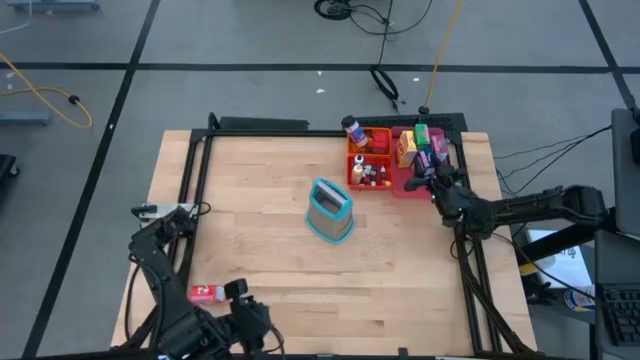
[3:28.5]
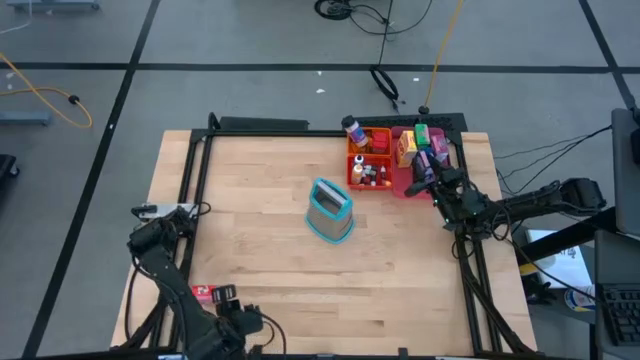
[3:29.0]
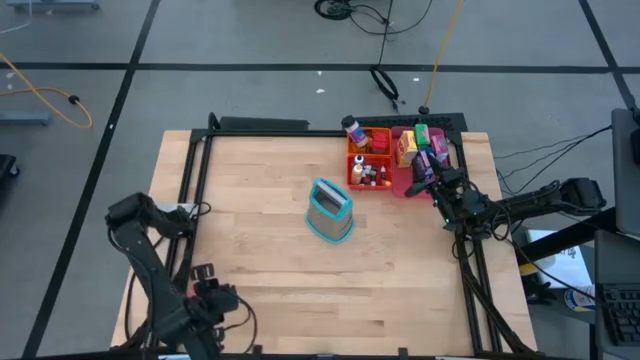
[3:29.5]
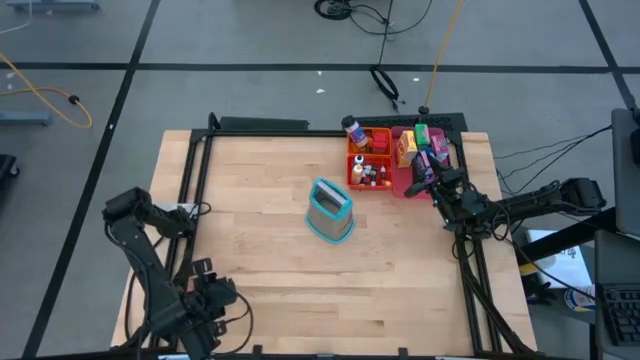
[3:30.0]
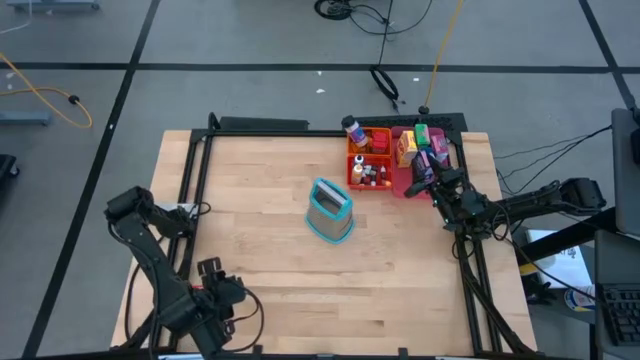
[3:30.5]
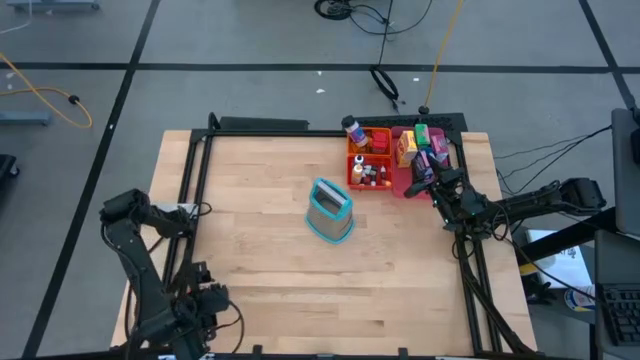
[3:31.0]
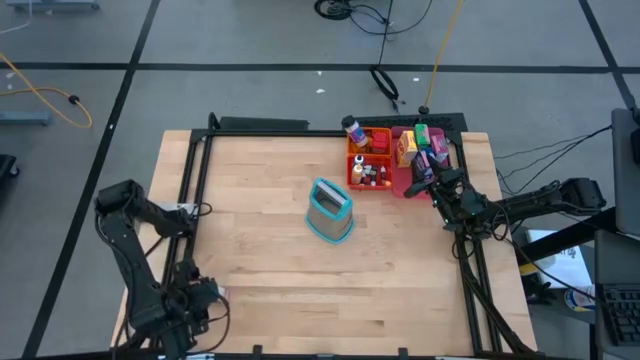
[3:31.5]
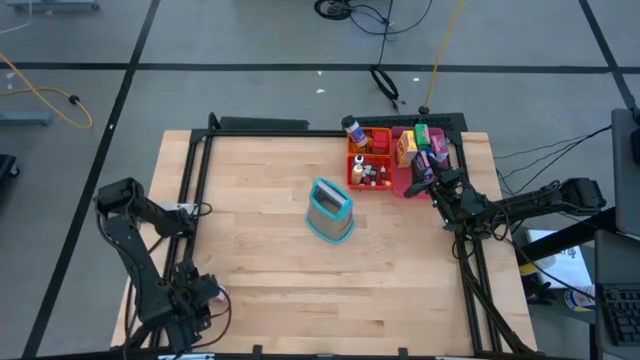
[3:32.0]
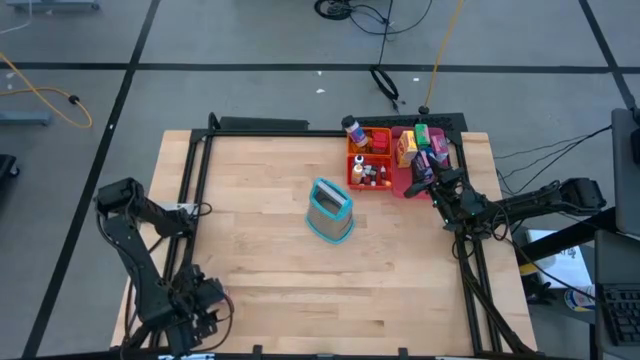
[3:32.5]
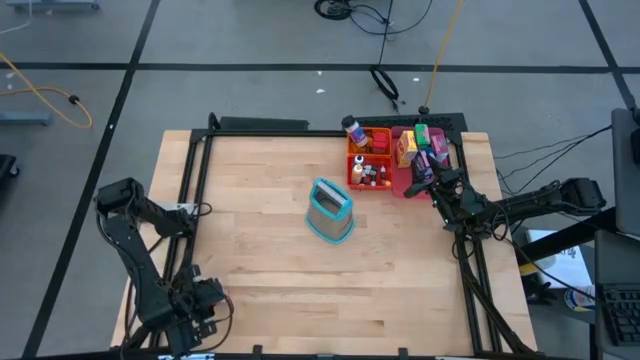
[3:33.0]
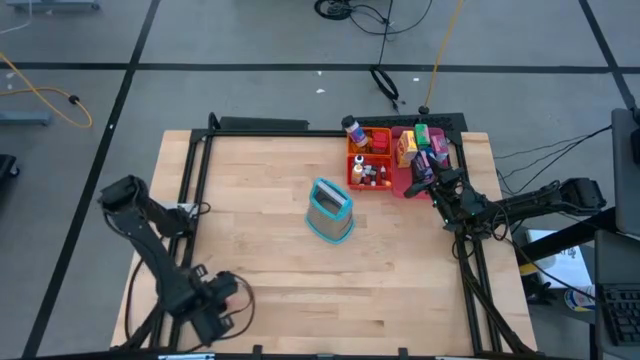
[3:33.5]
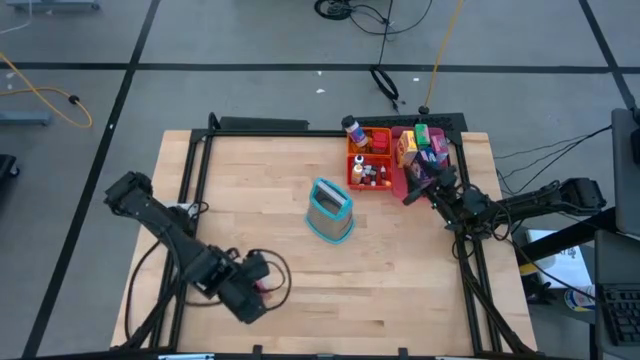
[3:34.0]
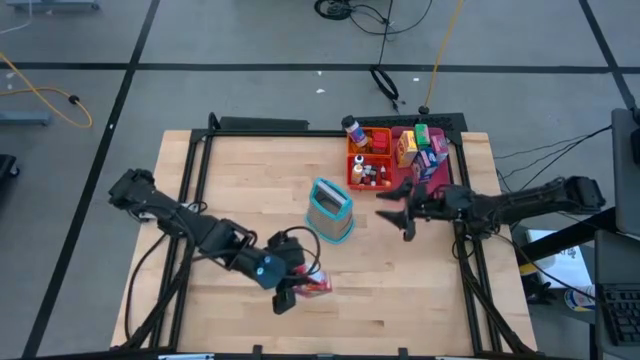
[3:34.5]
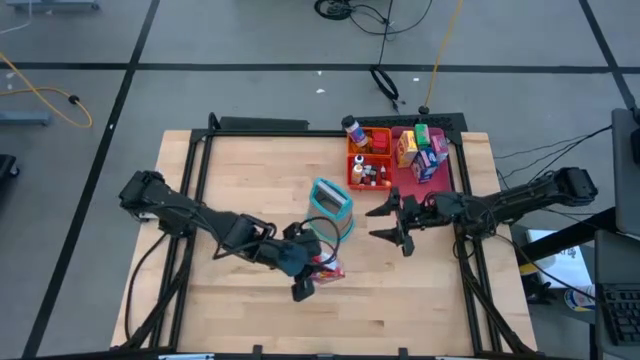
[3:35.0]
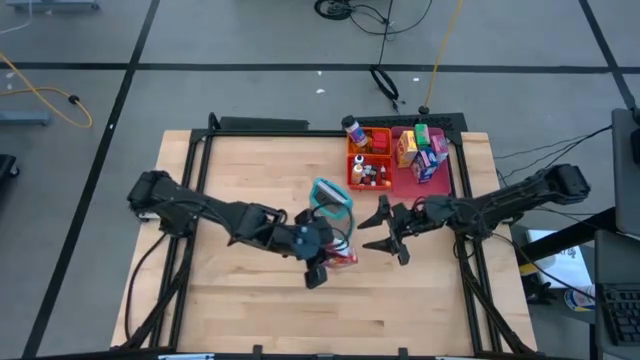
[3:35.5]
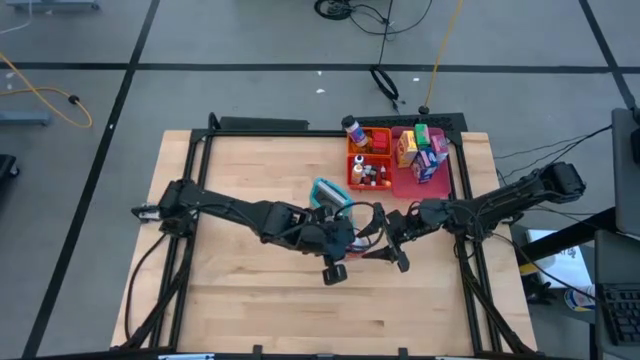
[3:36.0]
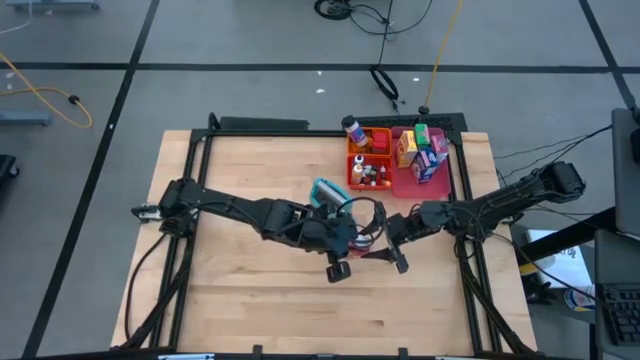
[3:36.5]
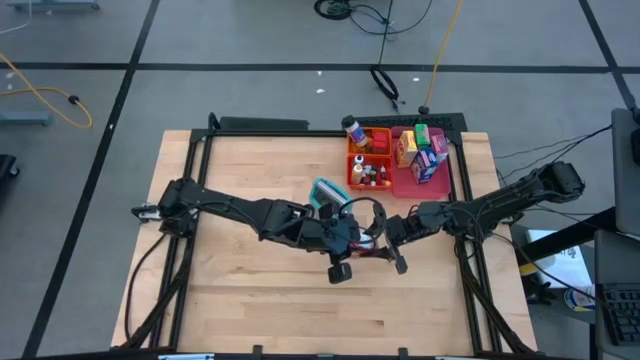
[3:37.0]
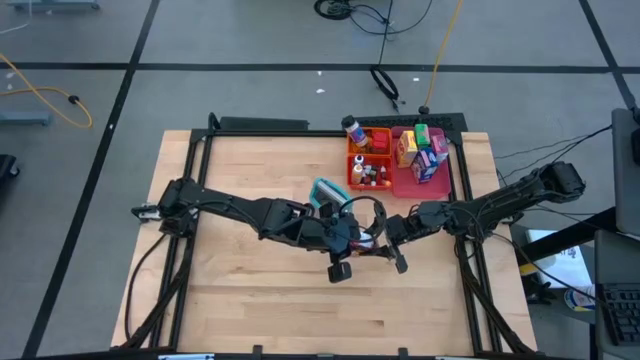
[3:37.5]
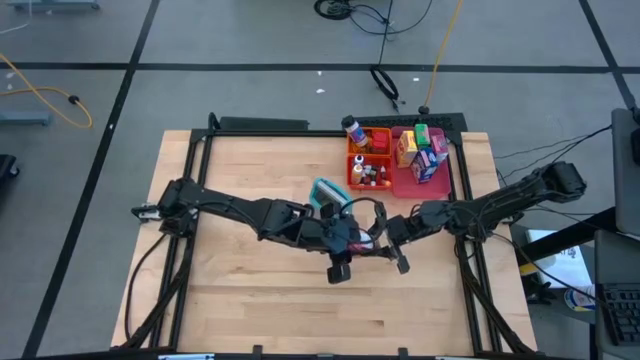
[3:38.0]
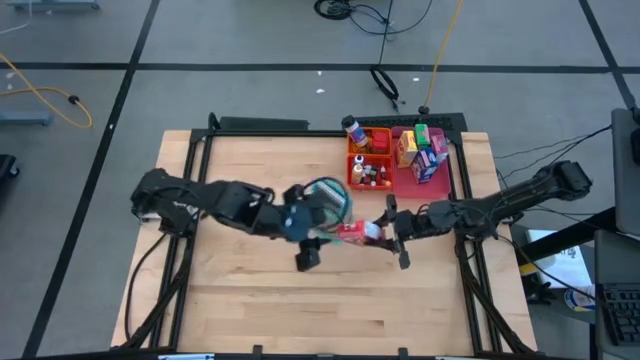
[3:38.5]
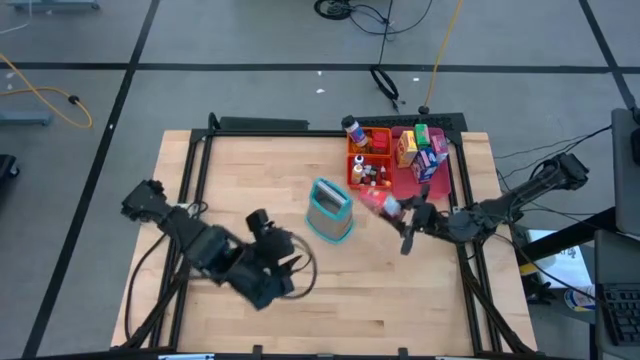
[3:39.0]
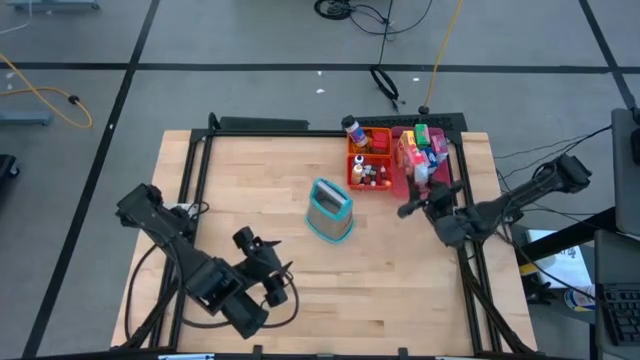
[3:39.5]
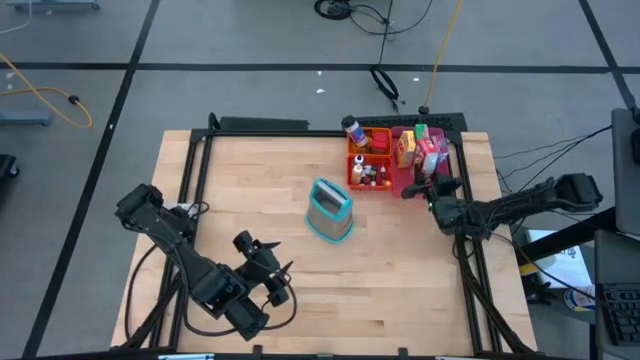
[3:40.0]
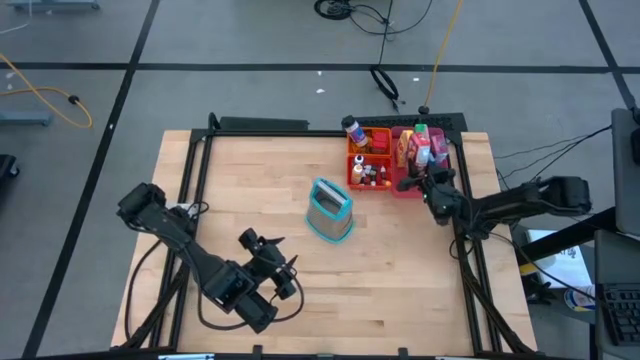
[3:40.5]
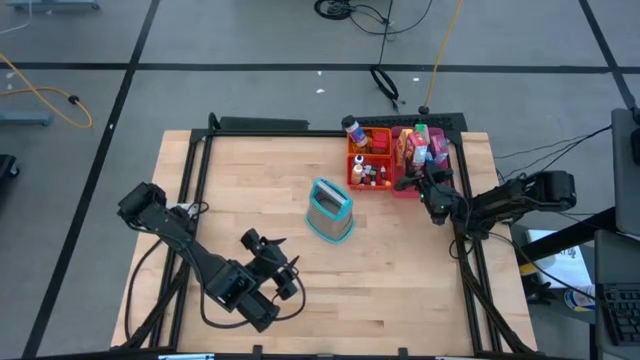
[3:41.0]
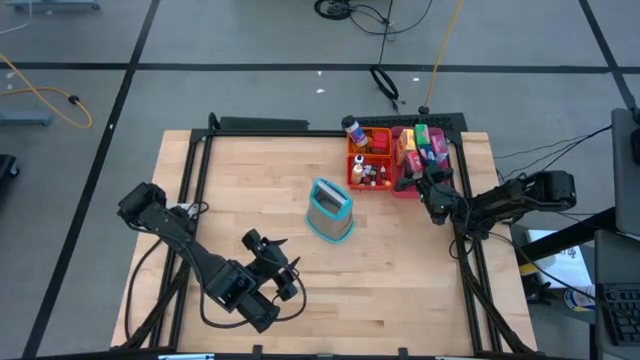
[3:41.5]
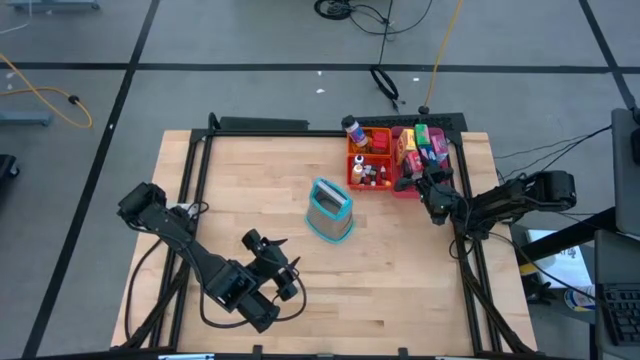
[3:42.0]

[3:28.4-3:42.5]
Task: Pick & Place Kitchen Items
Put the red cereal box into the red bin

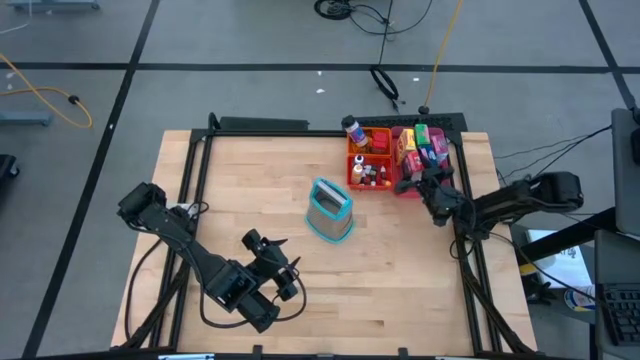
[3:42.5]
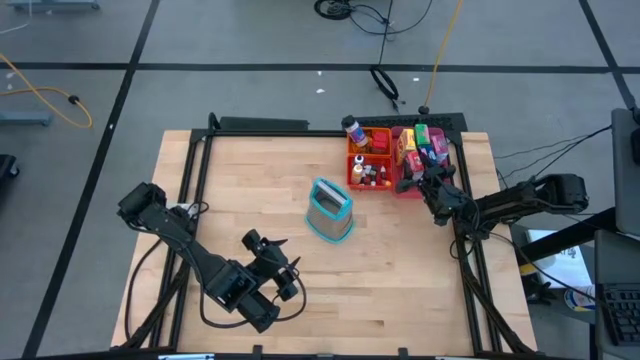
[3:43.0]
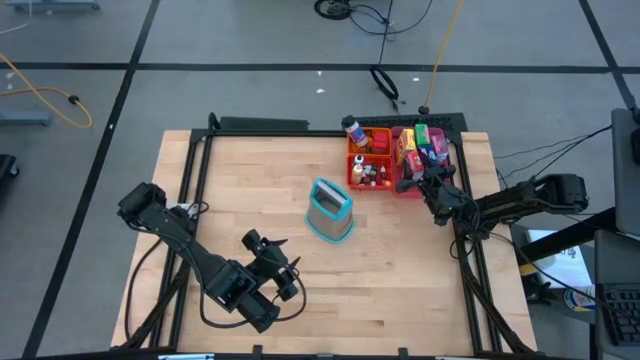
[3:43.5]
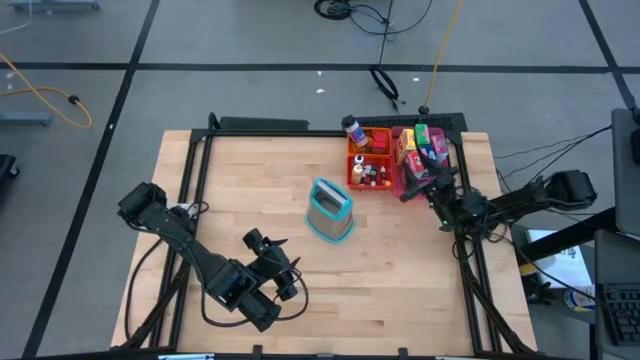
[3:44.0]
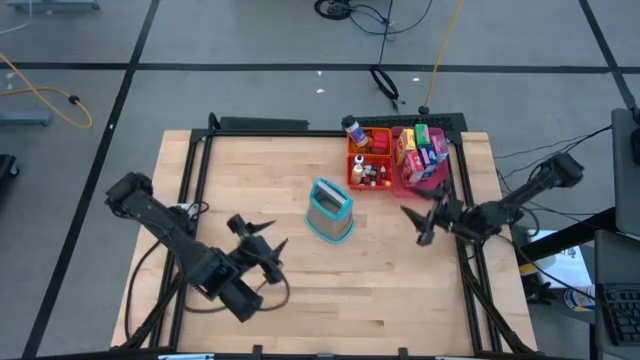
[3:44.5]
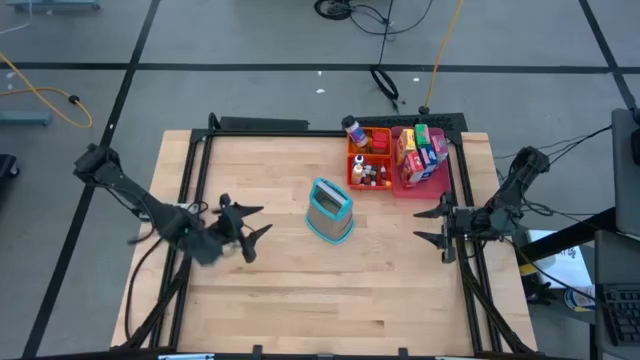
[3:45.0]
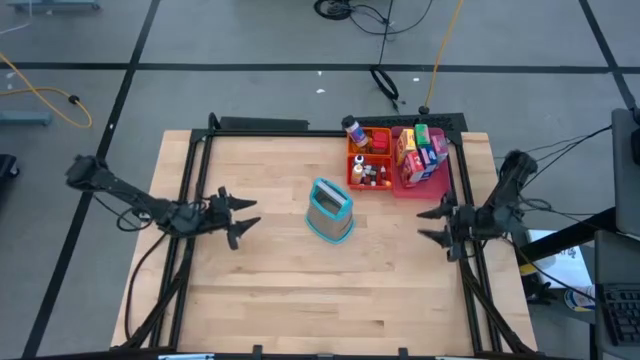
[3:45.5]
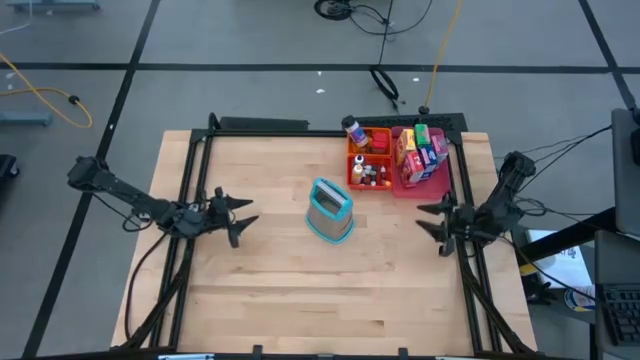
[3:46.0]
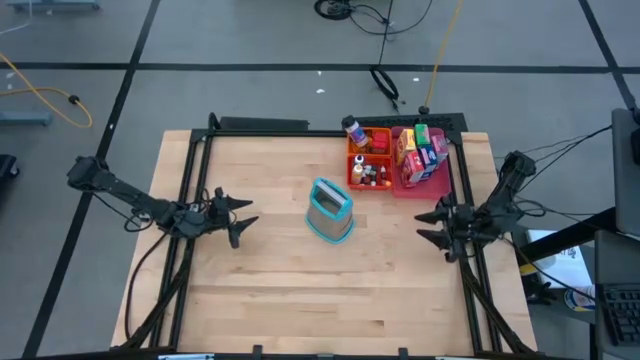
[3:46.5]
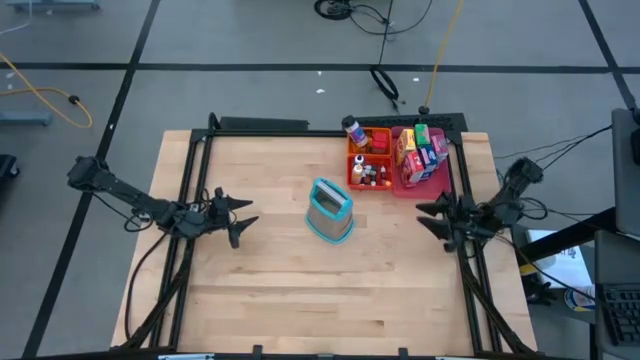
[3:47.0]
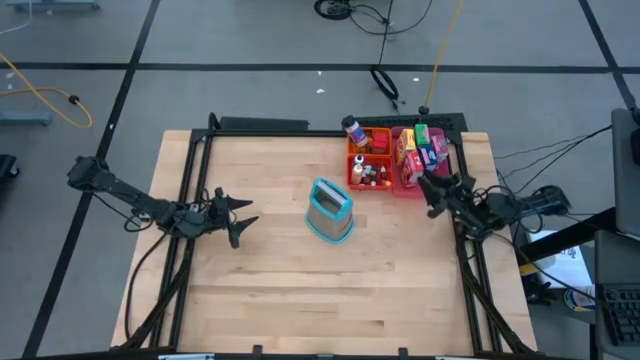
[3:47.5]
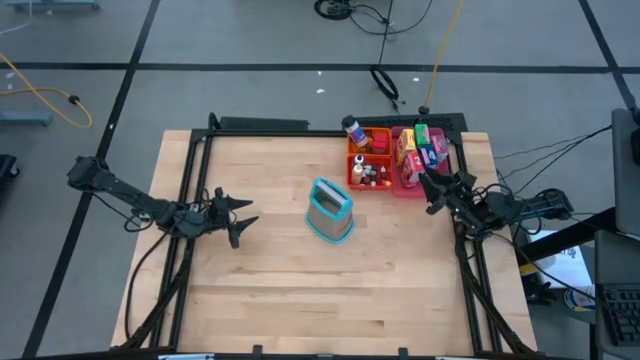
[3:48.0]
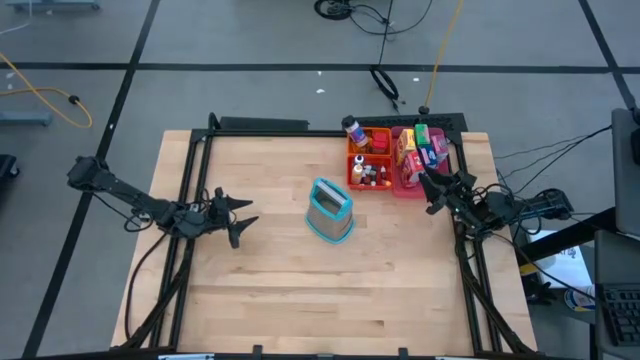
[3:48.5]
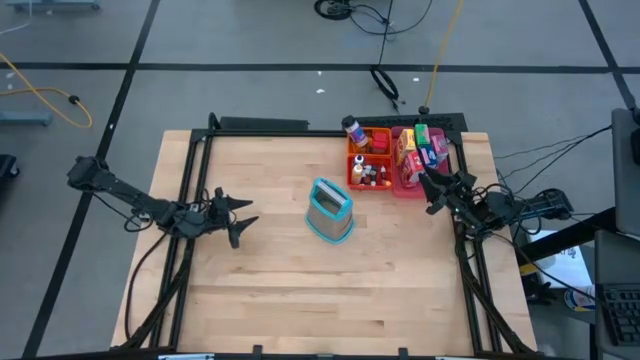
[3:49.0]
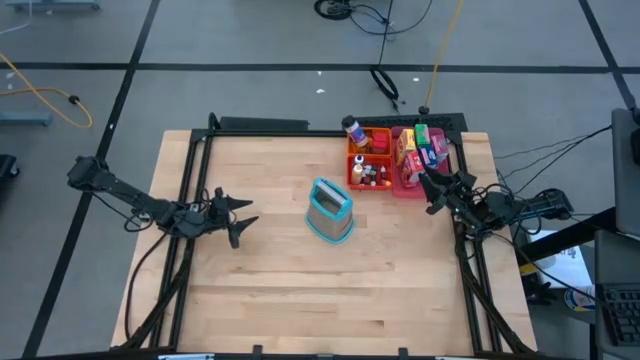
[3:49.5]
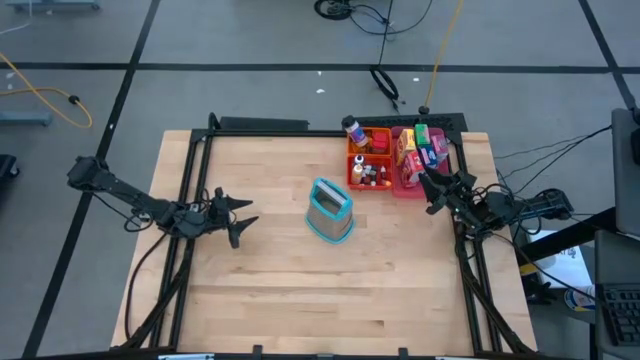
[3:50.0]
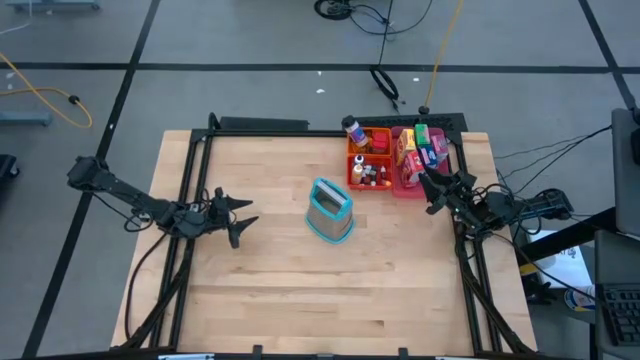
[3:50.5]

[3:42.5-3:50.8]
Return to Home Position
